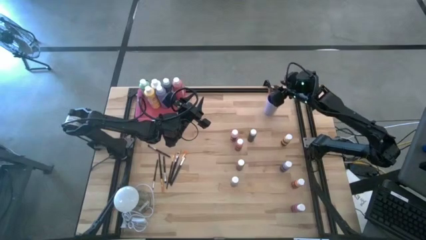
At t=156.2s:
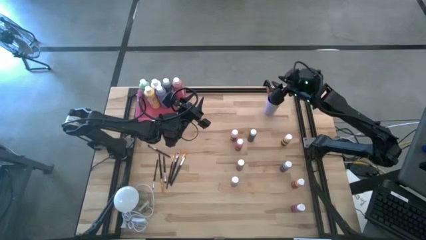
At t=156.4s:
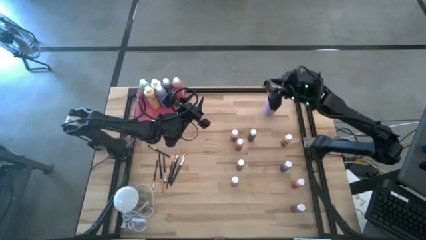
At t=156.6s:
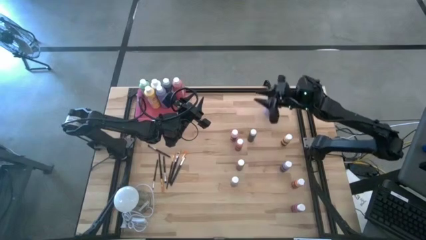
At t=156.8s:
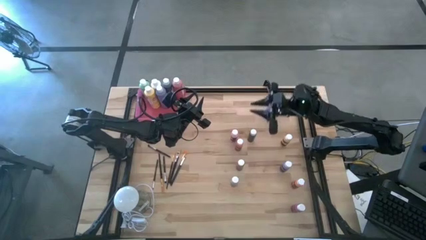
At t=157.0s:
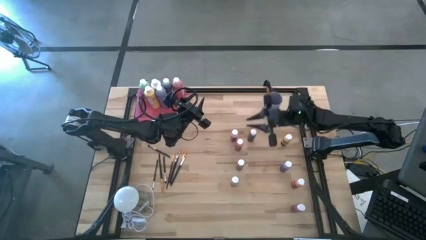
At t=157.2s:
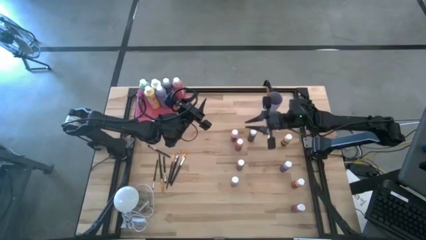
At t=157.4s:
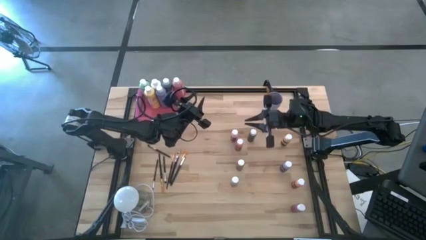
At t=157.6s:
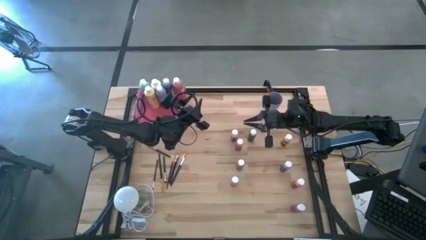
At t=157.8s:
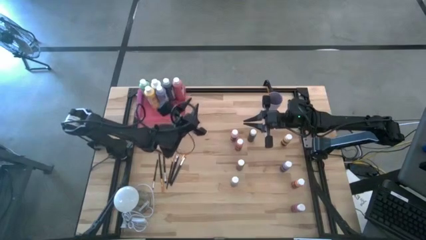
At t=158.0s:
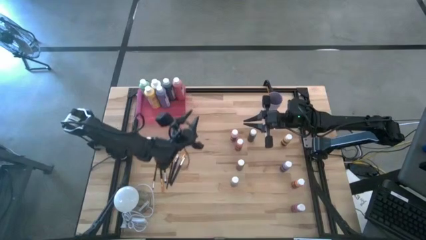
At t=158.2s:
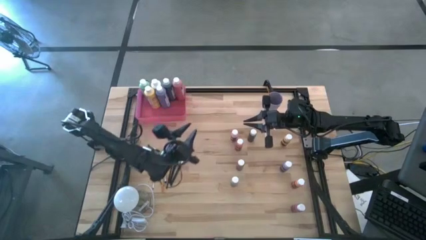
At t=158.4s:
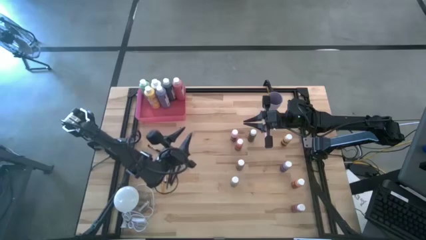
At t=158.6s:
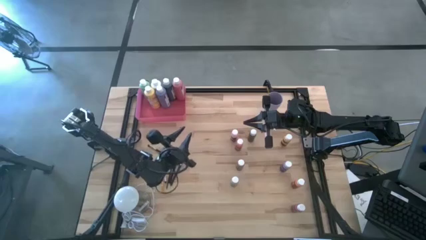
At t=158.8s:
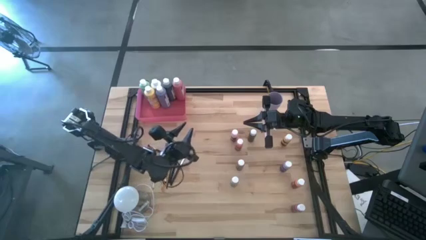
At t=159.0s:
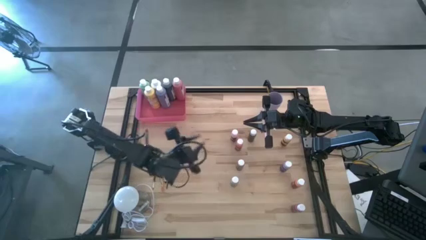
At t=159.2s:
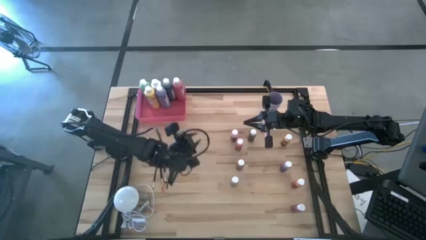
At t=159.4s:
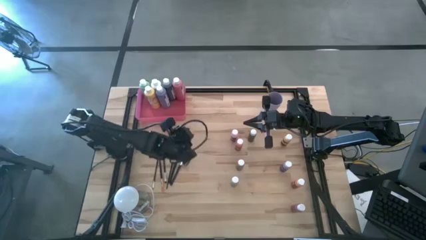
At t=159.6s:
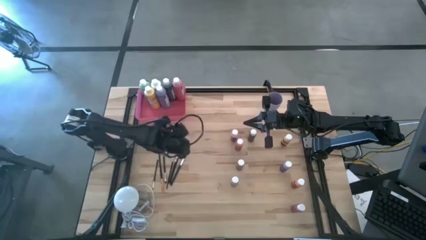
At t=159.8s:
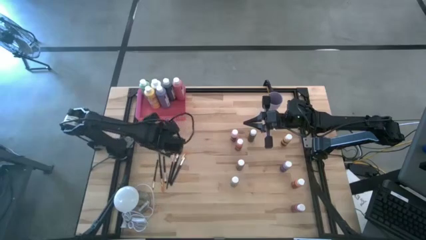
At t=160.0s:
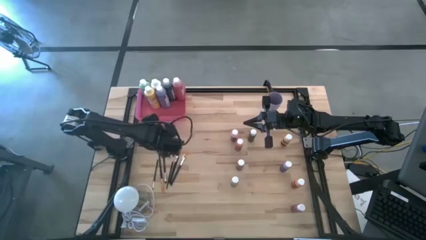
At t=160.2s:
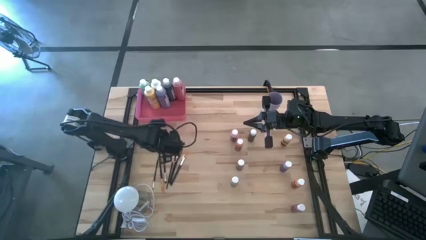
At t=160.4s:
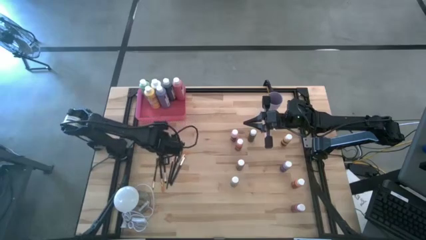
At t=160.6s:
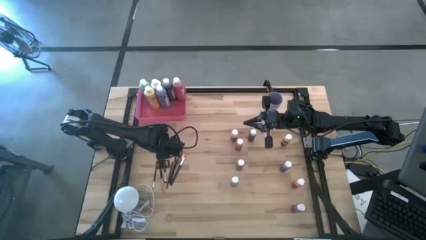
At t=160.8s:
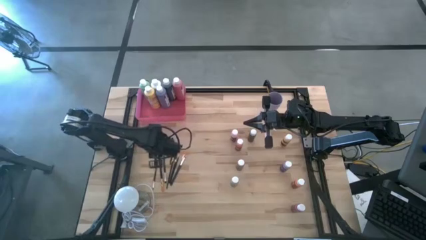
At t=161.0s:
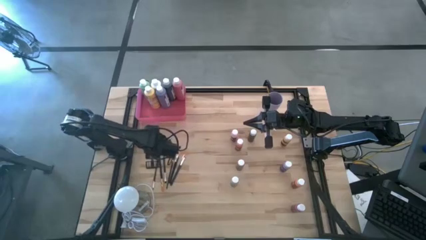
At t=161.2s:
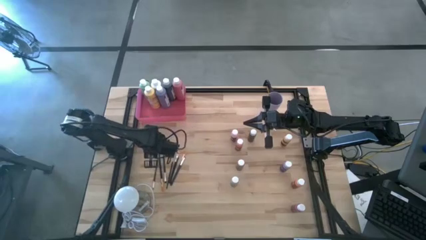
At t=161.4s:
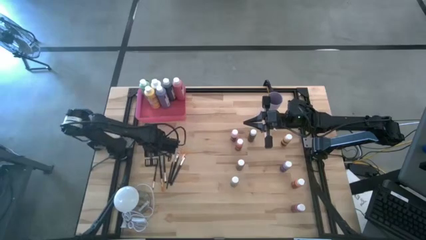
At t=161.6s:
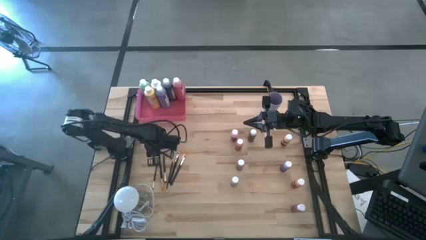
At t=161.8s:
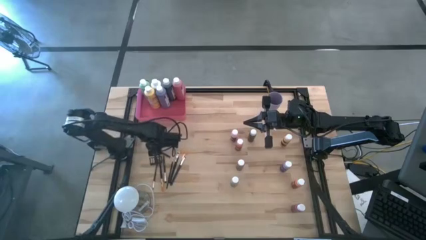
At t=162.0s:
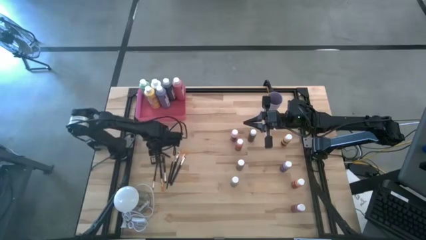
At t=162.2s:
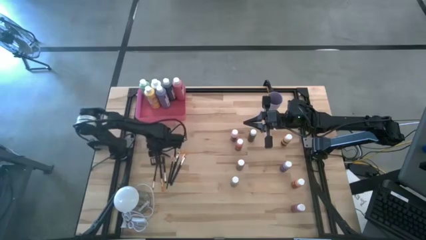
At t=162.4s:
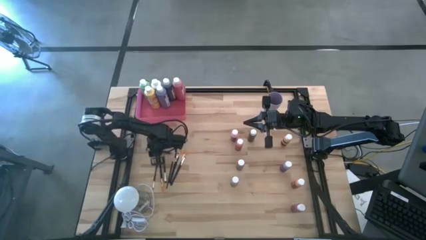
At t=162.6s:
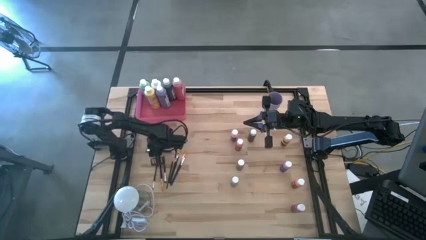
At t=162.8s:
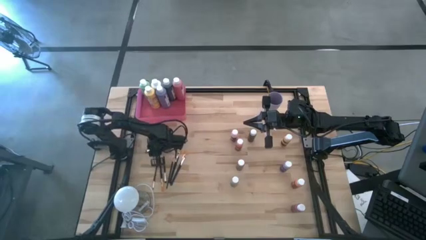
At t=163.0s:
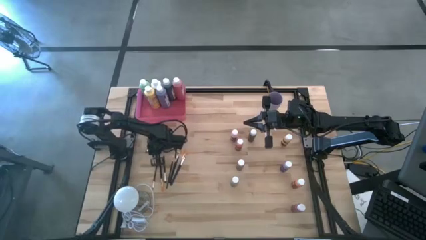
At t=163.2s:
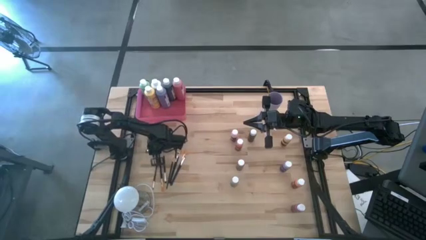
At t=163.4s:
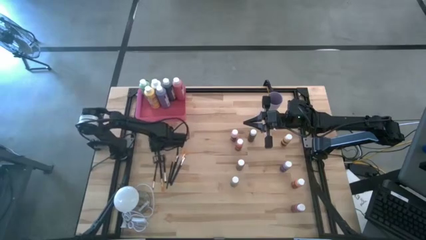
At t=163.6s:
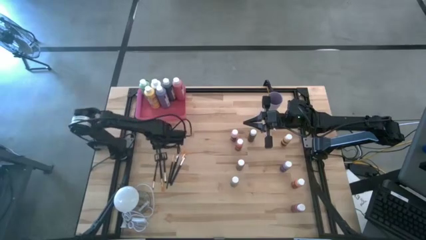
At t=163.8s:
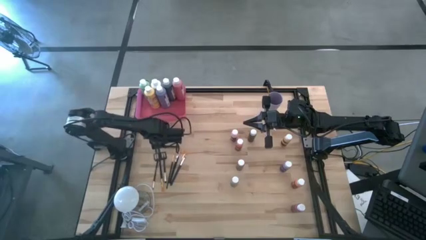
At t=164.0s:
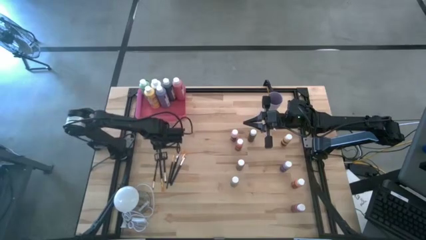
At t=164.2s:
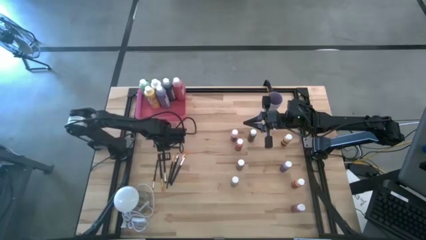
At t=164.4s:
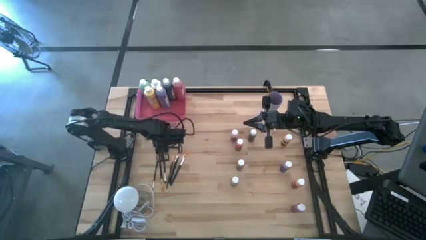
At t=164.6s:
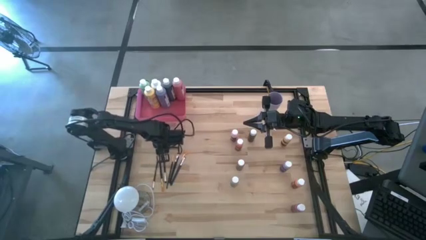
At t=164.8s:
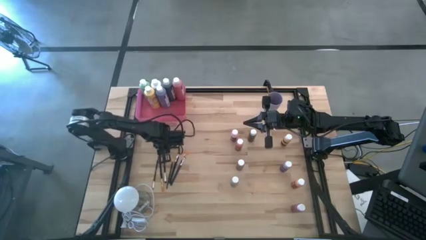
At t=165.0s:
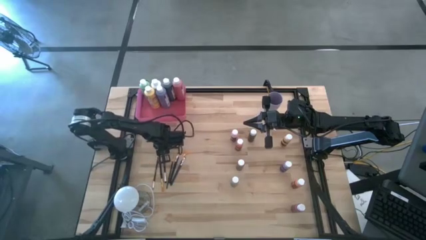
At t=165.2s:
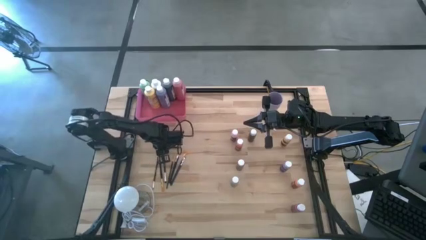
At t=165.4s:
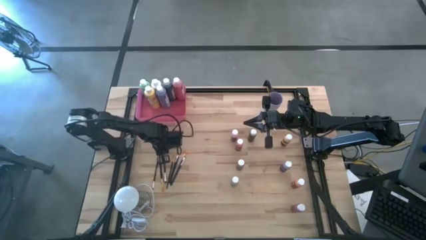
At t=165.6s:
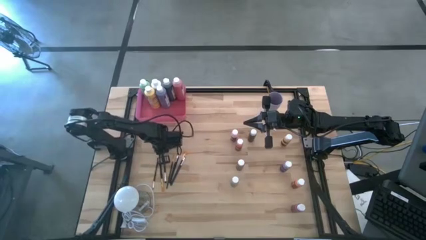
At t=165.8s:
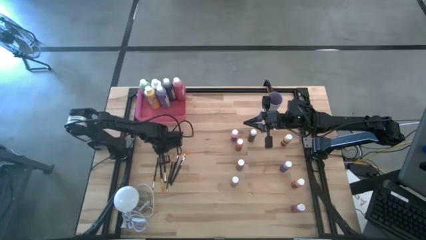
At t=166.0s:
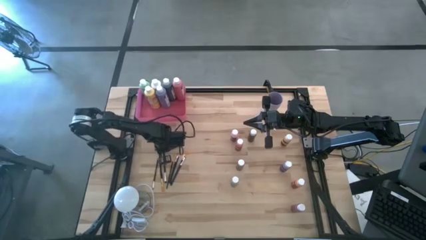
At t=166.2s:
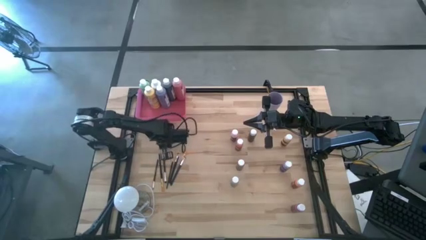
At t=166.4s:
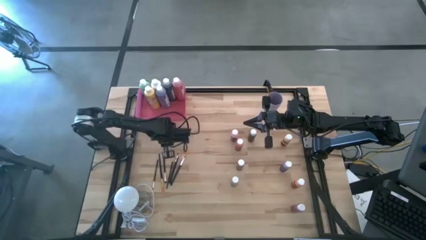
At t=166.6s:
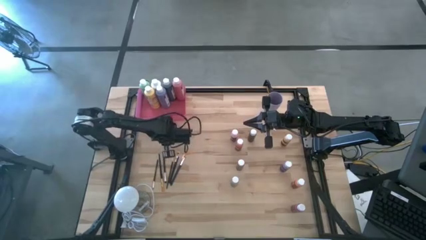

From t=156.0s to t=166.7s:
Task: Pick & Place Paint Supplies
Put the silver paint brush into the purple cup

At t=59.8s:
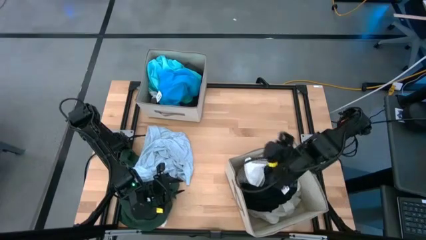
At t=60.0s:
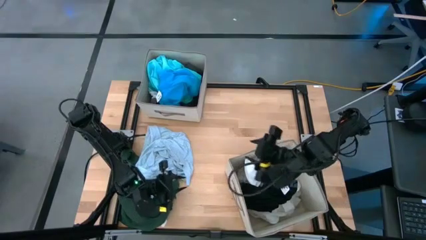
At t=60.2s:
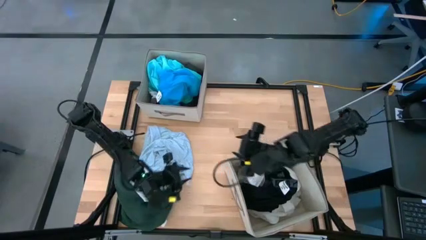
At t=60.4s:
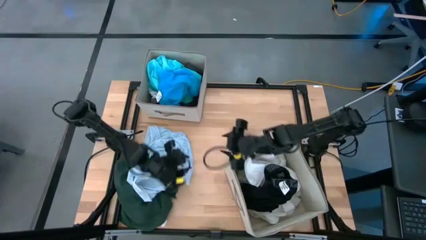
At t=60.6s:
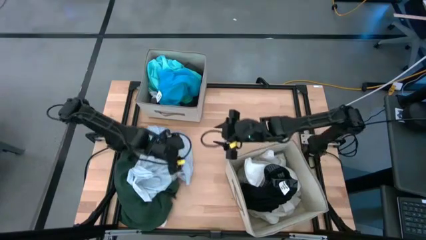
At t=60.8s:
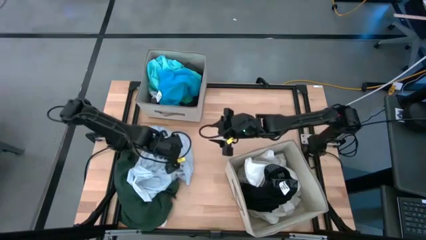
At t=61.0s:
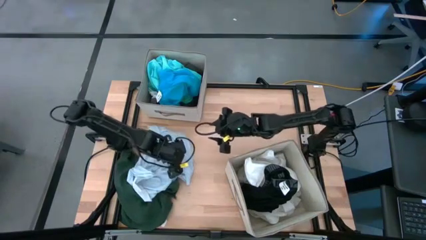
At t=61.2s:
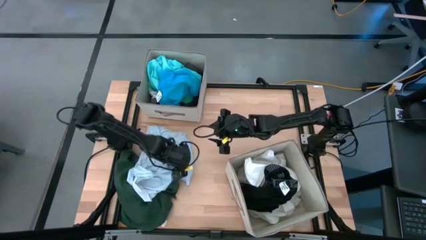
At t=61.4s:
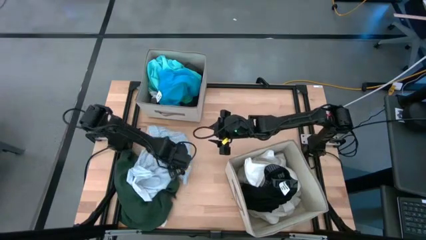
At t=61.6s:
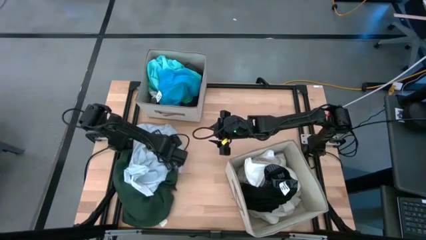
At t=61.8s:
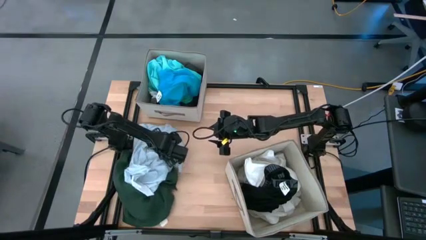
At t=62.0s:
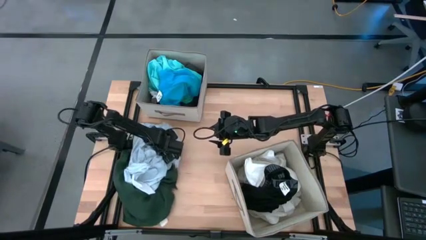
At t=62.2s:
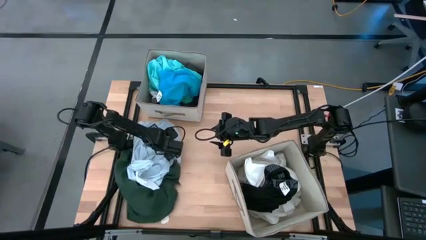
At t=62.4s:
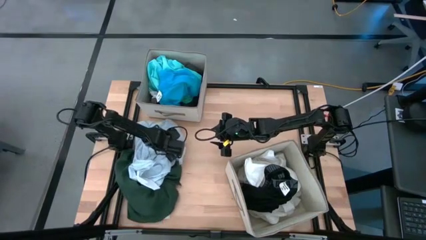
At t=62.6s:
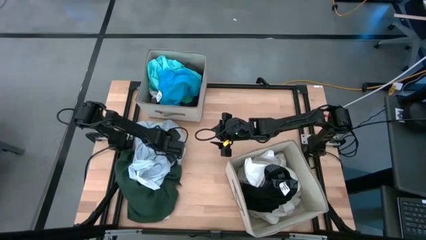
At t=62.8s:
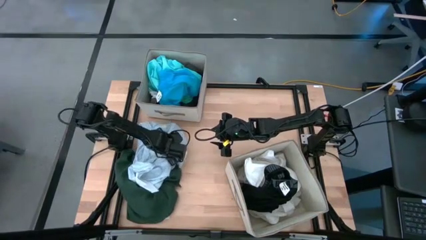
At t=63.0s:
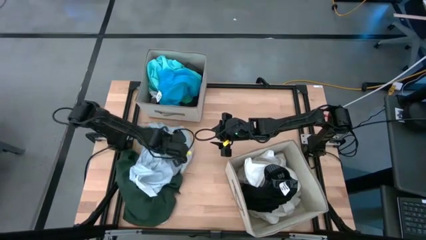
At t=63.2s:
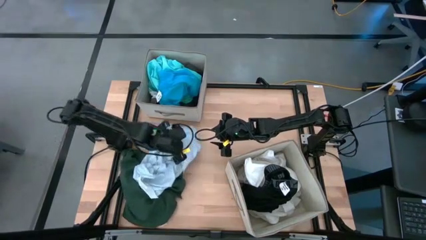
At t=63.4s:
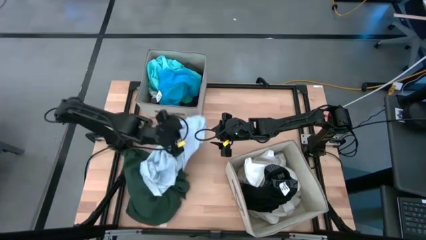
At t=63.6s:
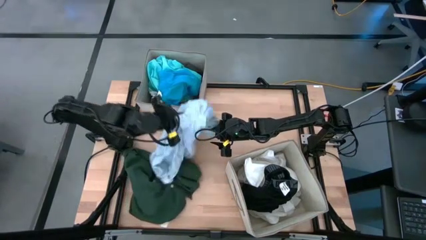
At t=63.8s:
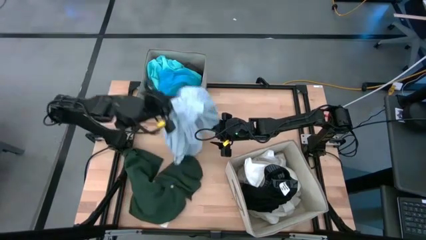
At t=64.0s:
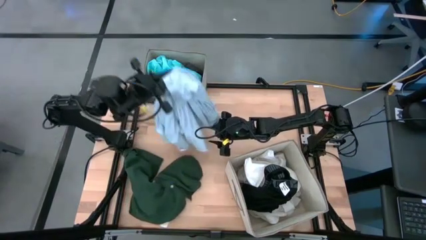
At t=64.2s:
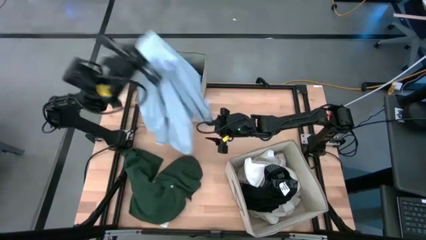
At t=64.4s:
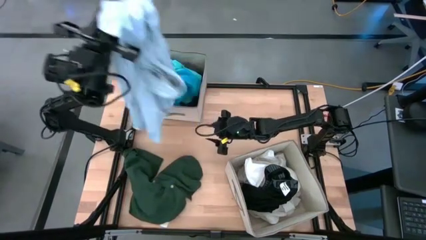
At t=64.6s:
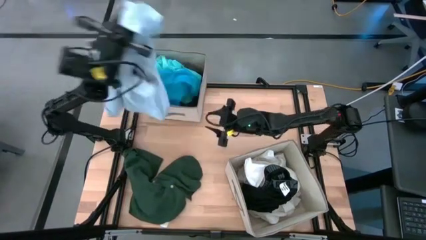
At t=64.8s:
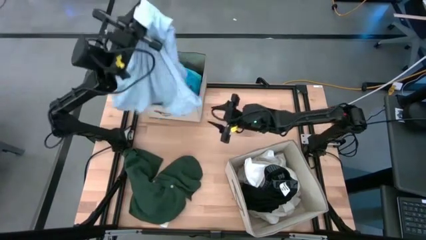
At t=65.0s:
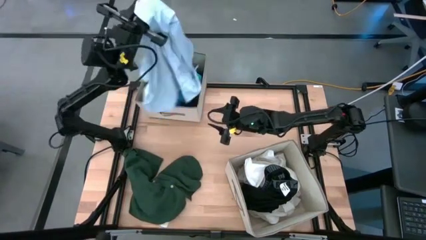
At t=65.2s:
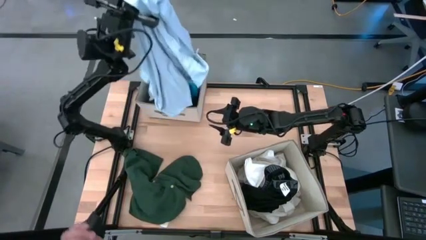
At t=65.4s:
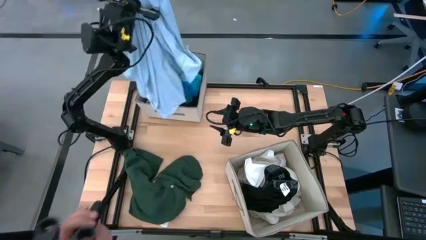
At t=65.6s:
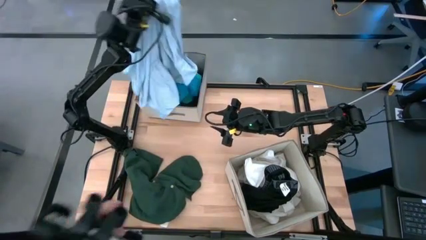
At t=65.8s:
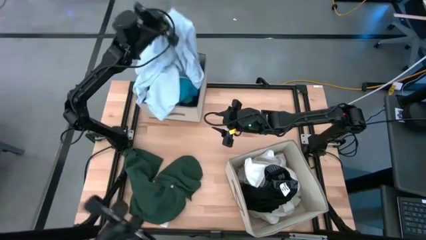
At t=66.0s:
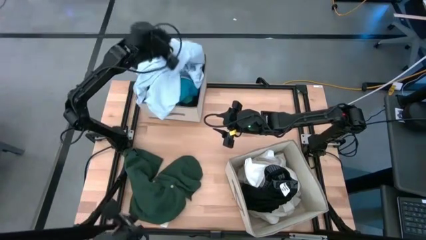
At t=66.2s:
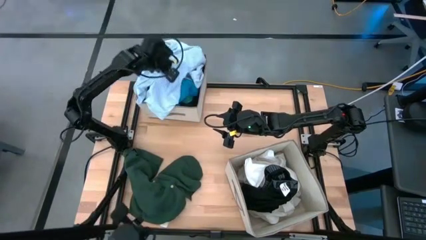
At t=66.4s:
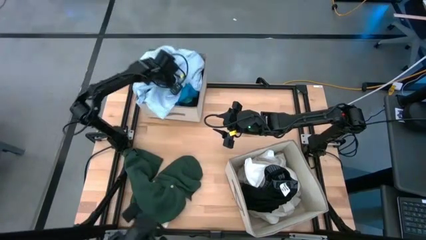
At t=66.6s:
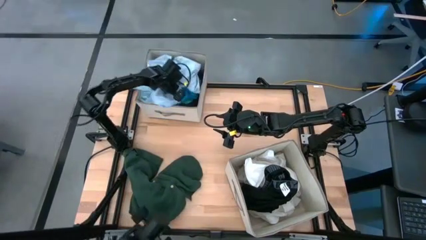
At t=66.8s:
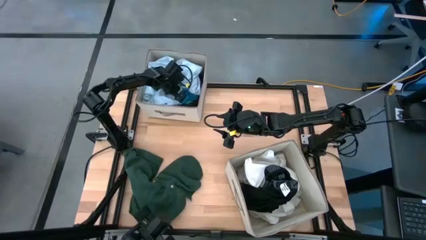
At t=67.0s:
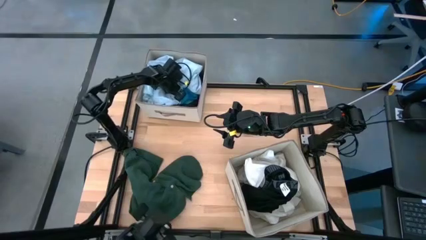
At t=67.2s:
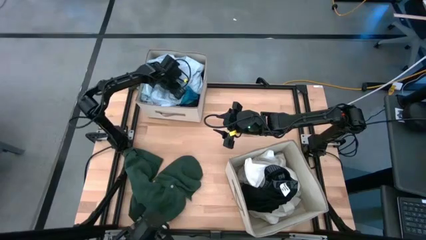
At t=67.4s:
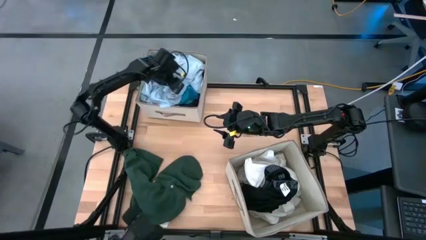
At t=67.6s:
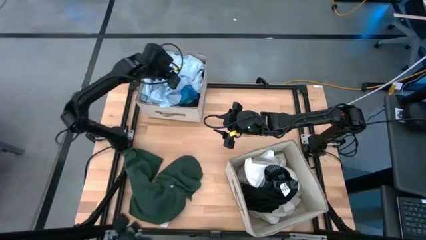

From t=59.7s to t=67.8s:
Task: Sort clothes
Put the light blue polo shirt into the top white laundry bin
